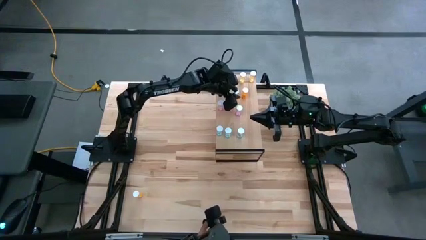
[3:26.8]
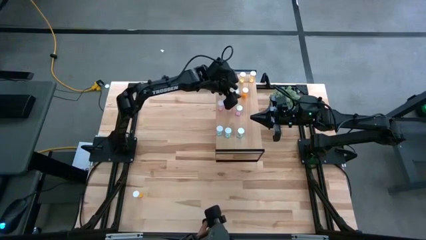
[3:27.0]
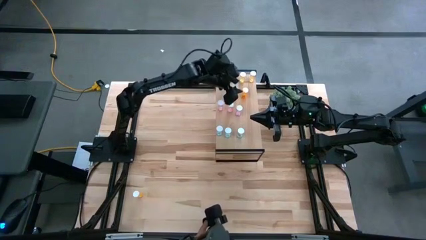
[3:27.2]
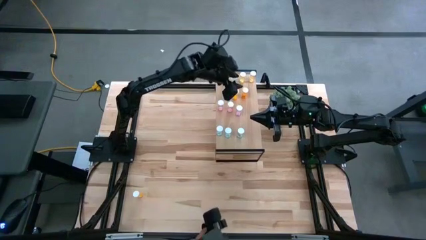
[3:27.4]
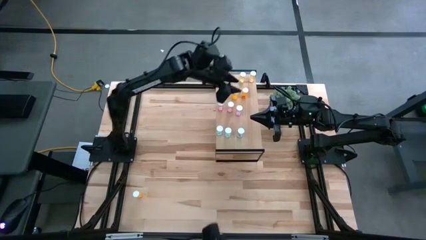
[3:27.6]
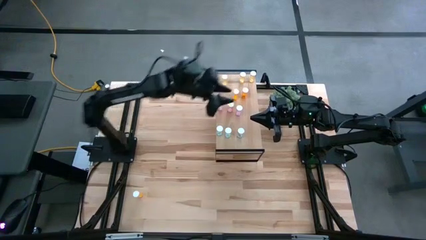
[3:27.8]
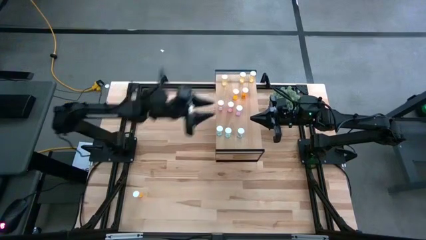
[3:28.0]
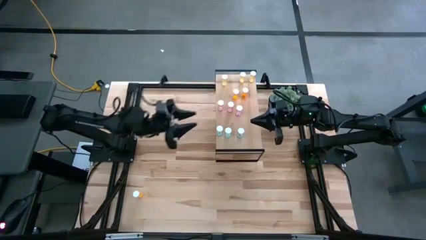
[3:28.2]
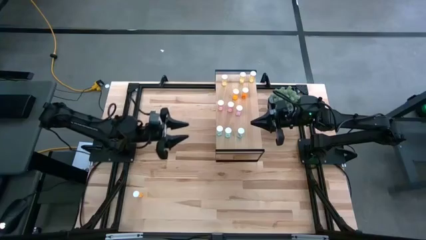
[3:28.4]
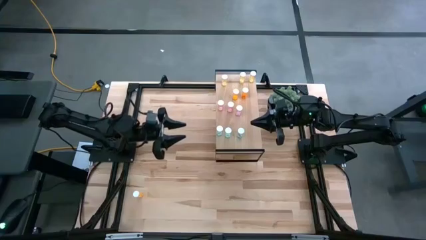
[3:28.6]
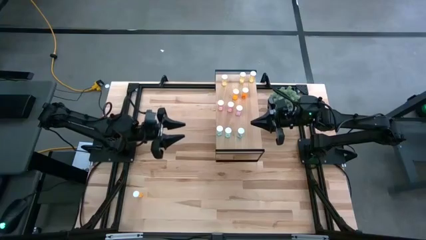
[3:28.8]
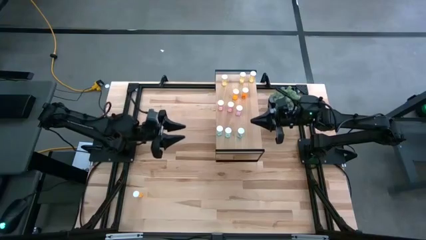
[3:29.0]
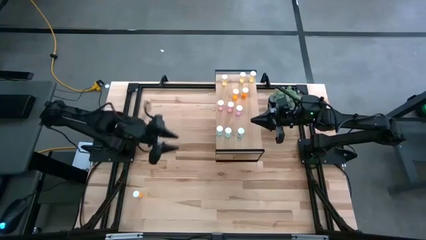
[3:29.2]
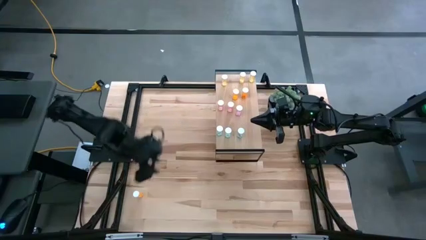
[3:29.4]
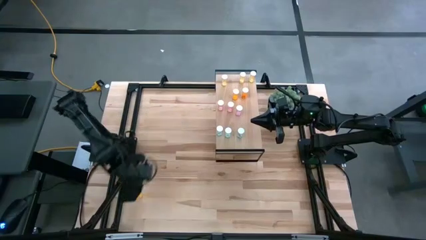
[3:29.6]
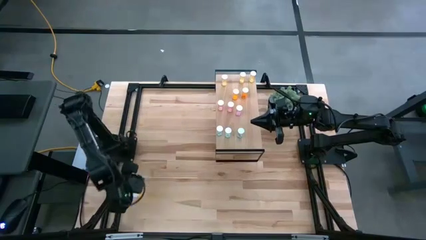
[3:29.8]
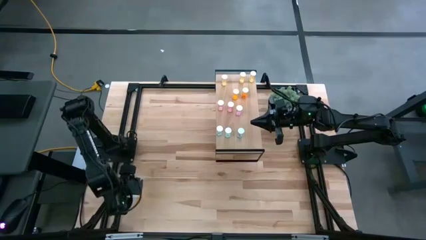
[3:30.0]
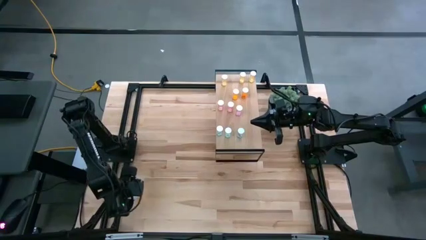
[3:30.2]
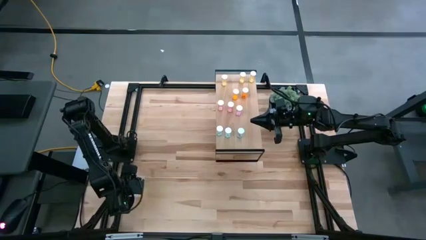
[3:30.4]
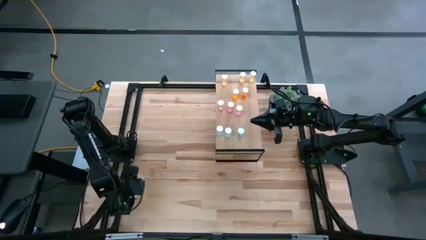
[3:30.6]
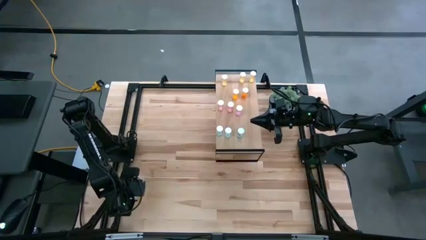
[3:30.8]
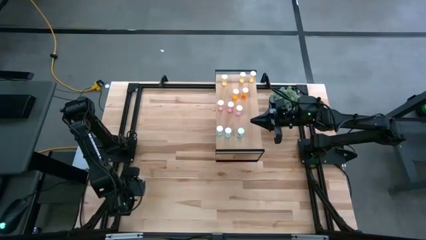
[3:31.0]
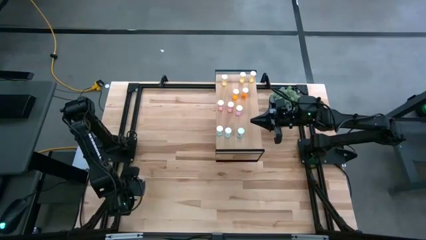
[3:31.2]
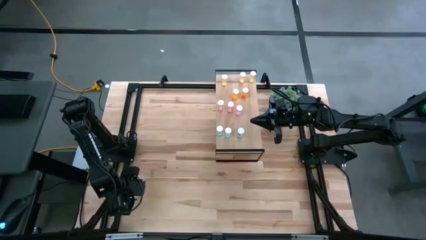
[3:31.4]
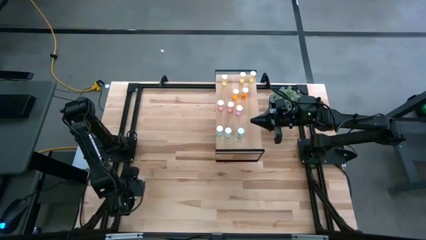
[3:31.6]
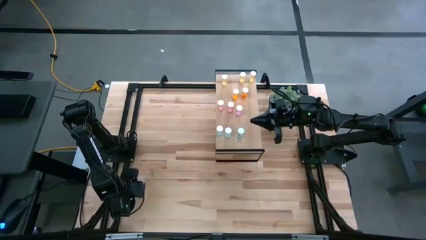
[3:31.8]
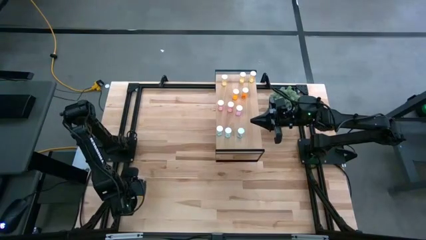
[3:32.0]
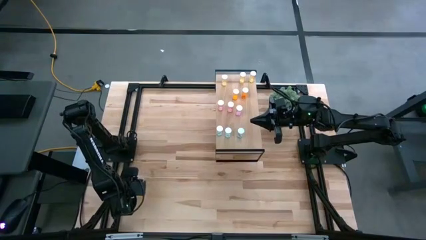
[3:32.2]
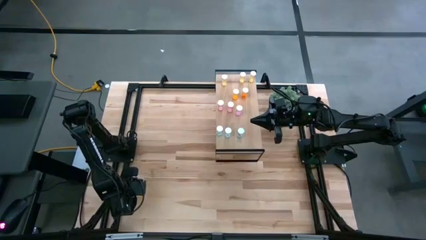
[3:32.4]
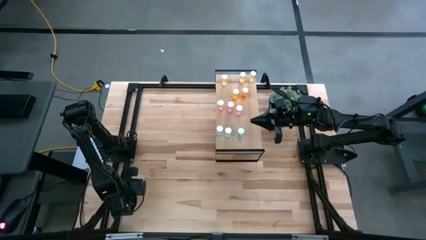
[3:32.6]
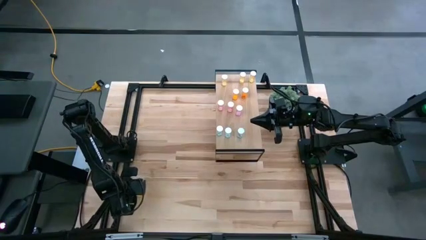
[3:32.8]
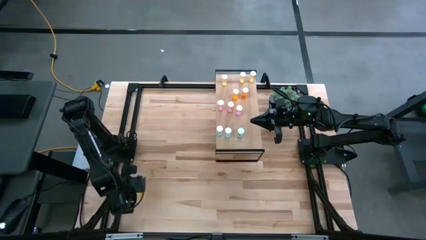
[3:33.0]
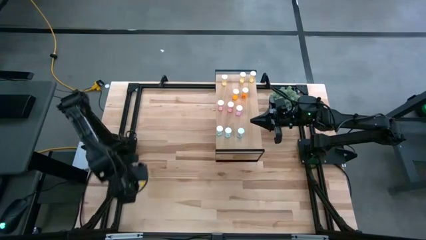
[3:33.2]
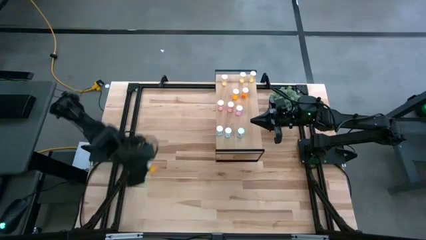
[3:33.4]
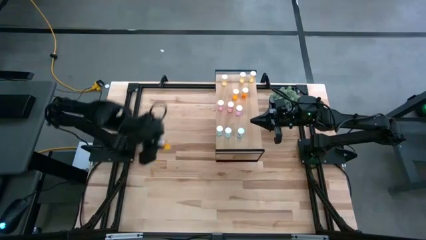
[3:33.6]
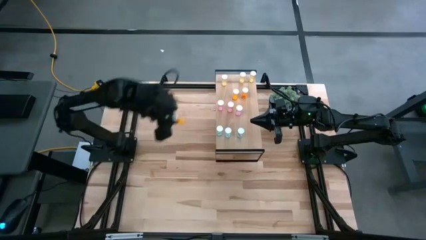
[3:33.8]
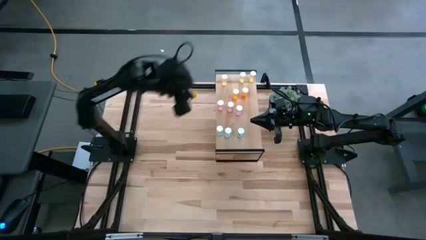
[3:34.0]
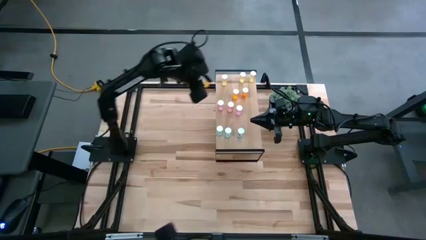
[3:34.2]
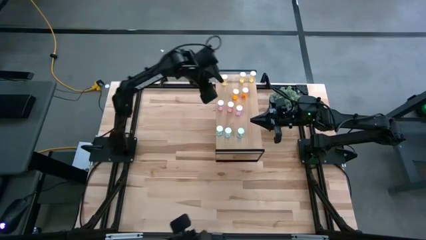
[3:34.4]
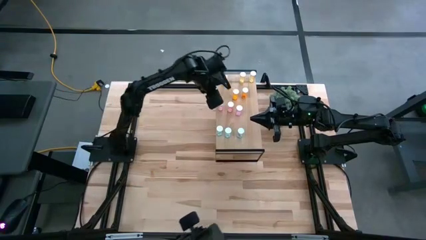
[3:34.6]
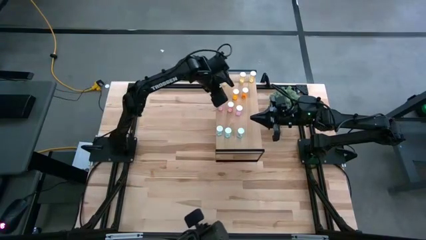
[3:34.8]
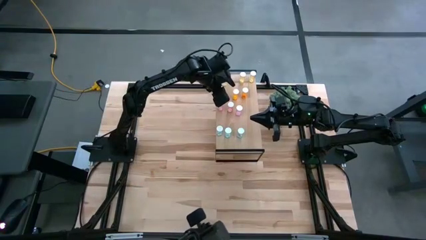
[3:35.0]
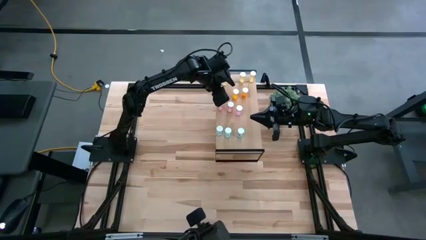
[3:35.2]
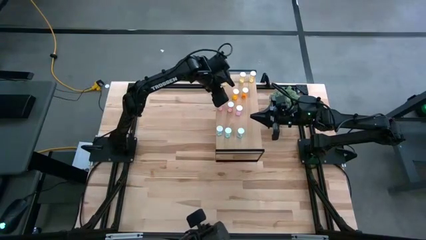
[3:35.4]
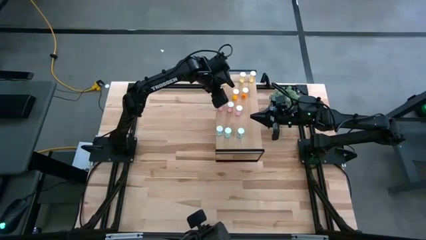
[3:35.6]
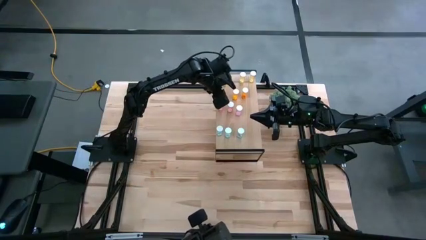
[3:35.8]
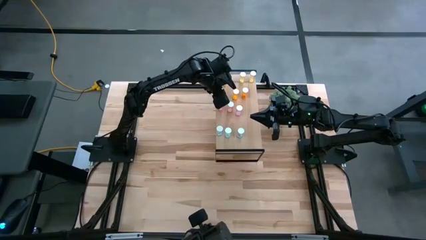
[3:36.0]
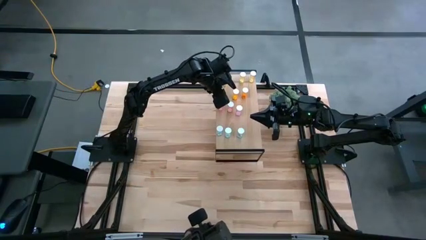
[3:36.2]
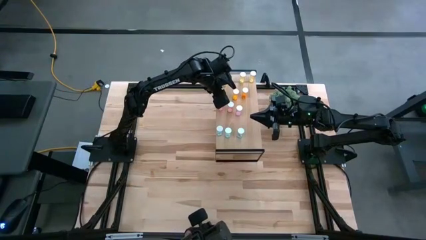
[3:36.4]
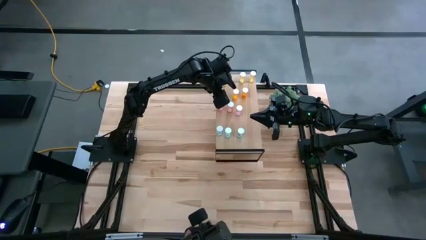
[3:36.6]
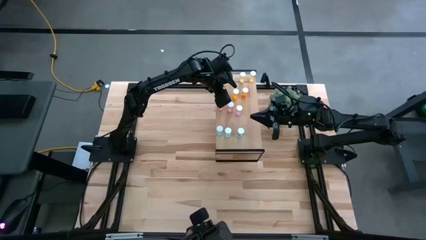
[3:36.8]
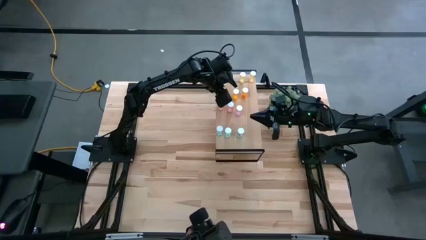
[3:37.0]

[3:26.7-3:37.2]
Task: Pick and place medicine bottles onto shelf by color
Put the orange pill bottle on the shelf aligned with the other orange pill bottles

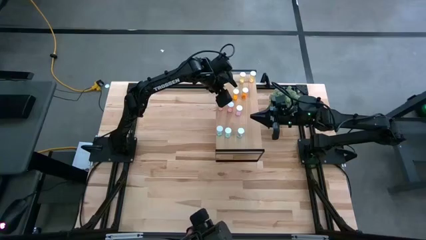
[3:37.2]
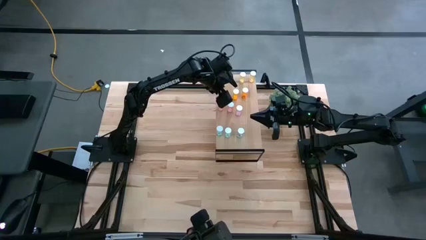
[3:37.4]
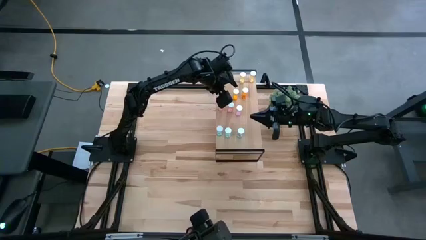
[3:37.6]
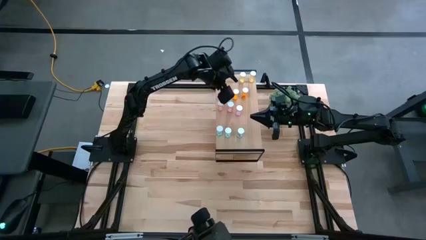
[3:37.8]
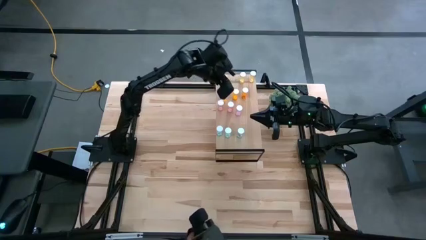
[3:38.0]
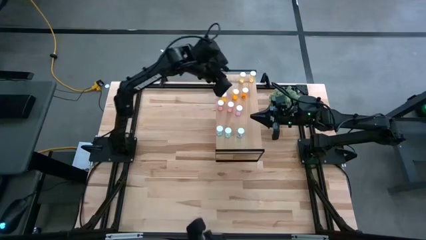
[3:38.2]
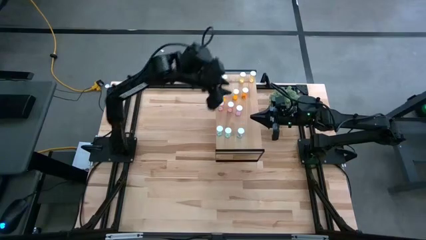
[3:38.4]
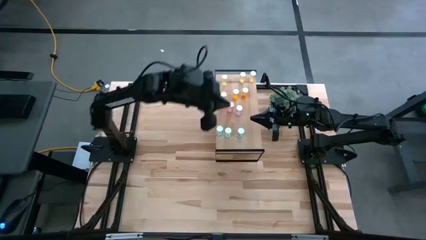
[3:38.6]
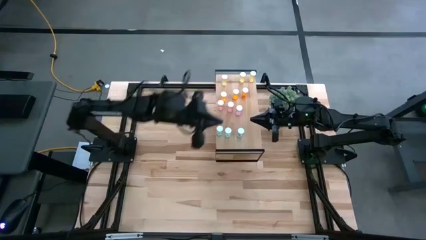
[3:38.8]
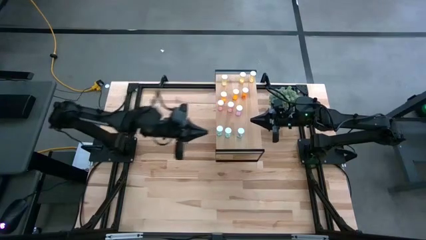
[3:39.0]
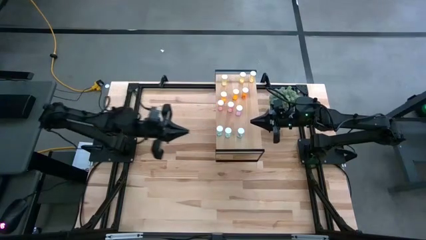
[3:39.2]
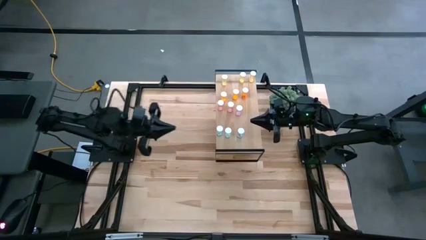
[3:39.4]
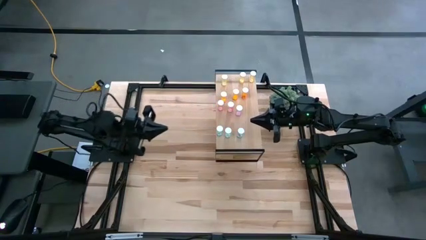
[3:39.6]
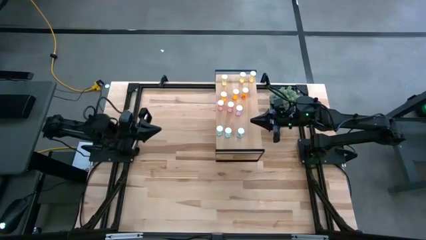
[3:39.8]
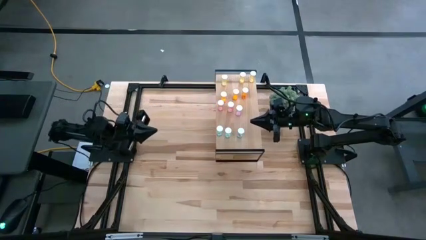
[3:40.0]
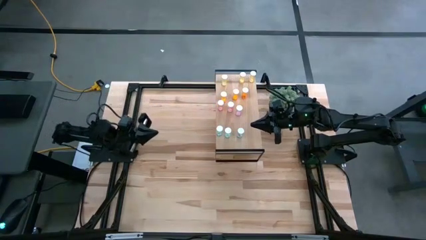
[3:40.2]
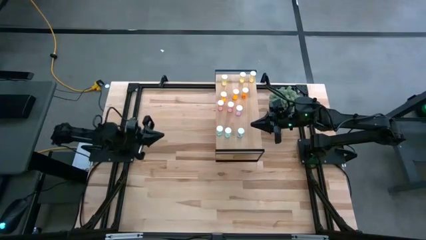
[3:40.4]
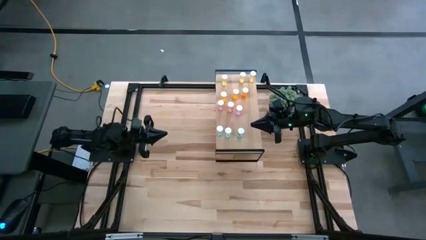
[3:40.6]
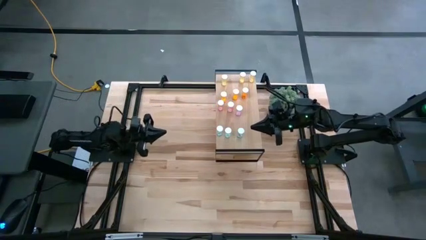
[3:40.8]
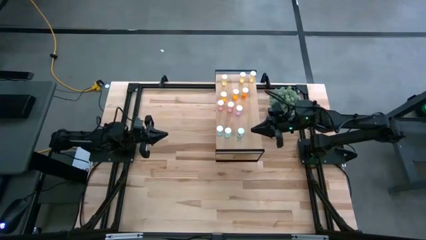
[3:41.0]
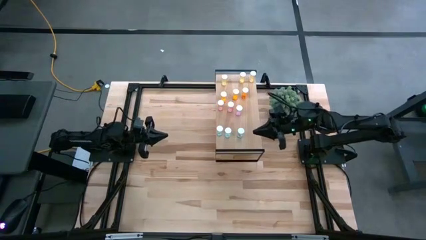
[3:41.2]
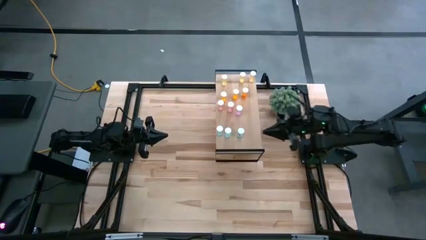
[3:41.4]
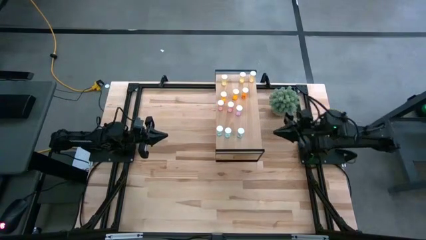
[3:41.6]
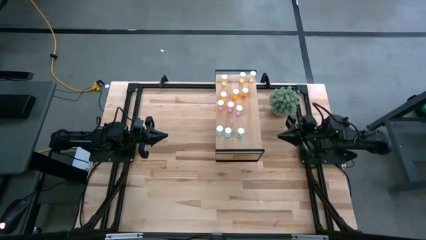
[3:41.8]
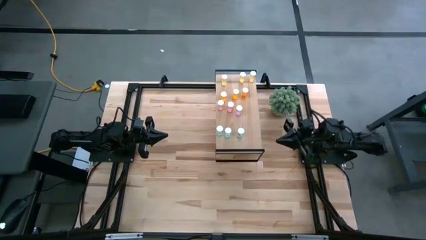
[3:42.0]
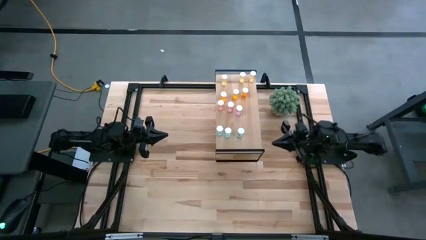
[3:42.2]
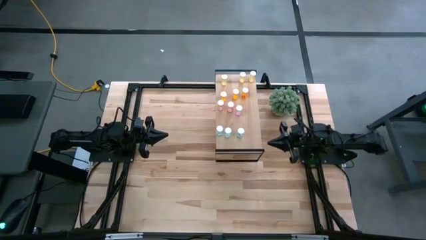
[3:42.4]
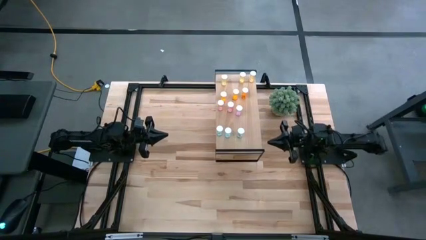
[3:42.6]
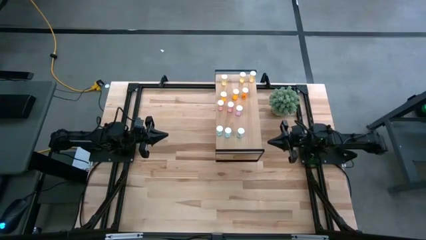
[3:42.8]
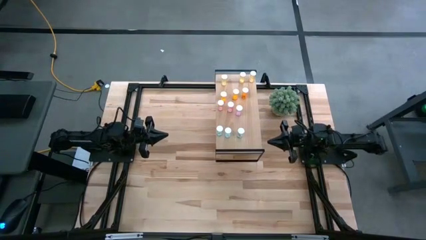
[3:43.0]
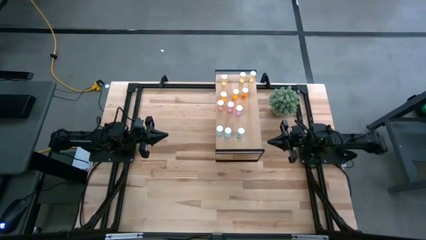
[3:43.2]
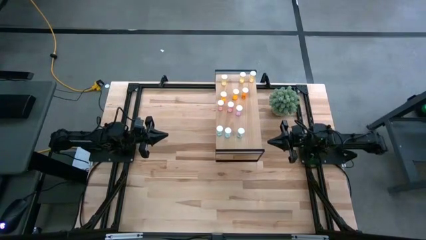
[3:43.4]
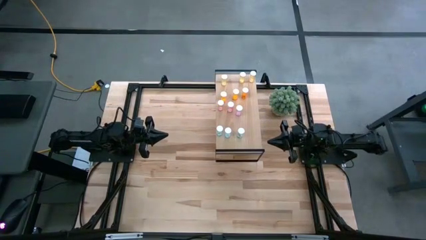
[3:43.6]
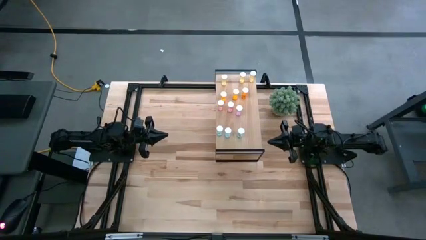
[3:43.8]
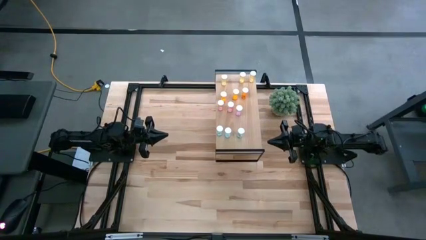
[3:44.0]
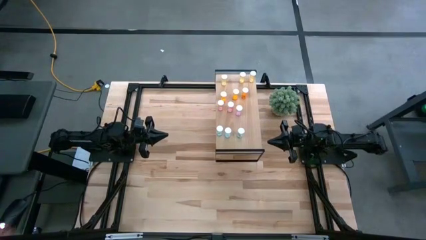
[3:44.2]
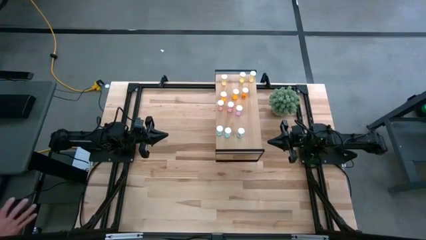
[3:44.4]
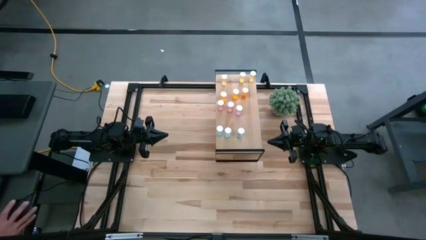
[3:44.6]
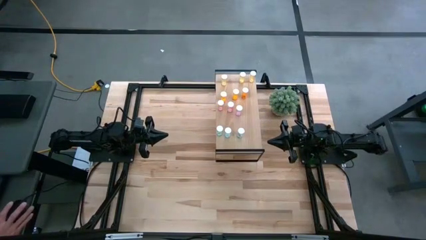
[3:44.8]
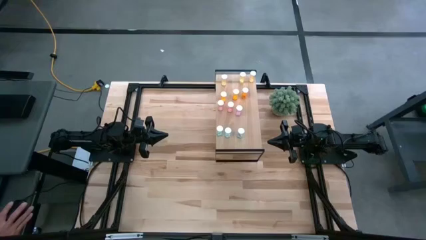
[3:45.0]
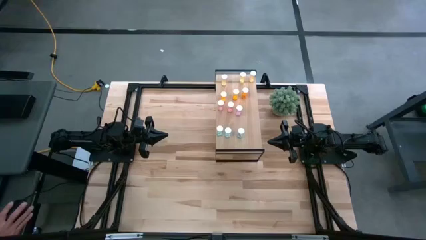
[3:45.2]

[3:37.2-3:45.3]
Return to Home Position
